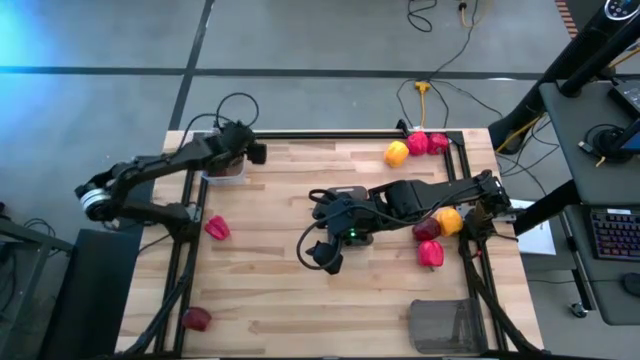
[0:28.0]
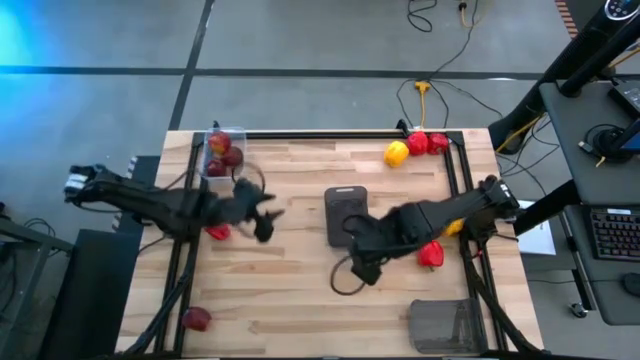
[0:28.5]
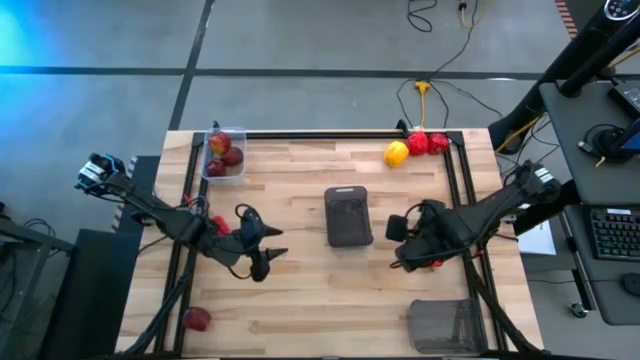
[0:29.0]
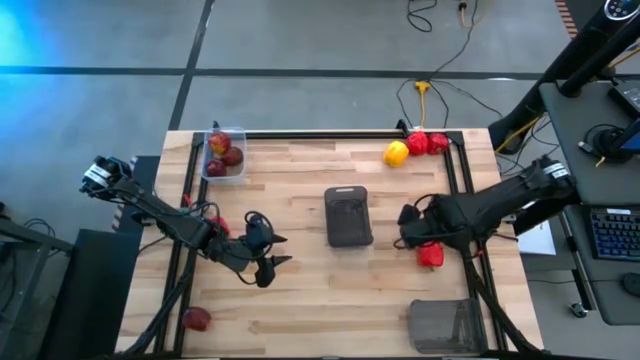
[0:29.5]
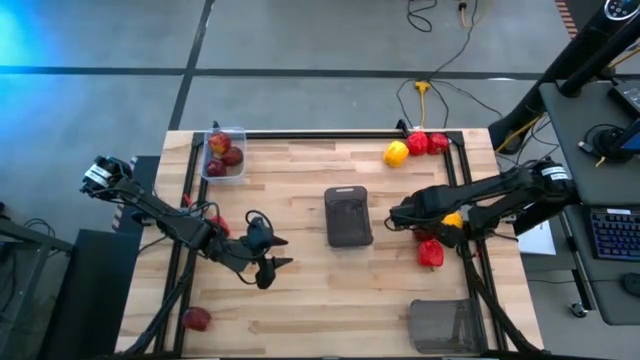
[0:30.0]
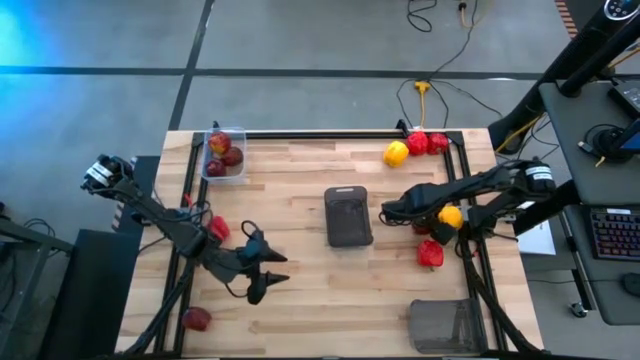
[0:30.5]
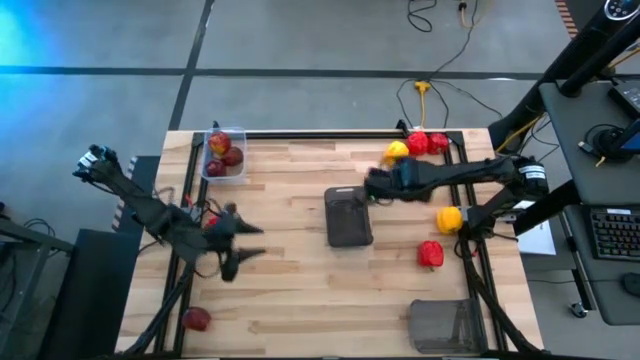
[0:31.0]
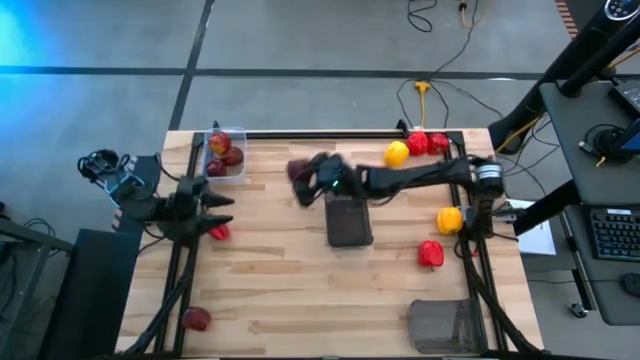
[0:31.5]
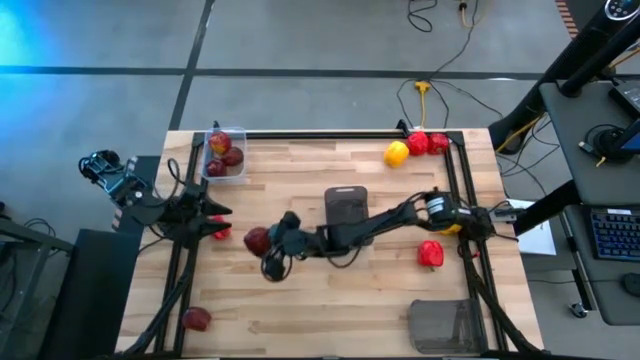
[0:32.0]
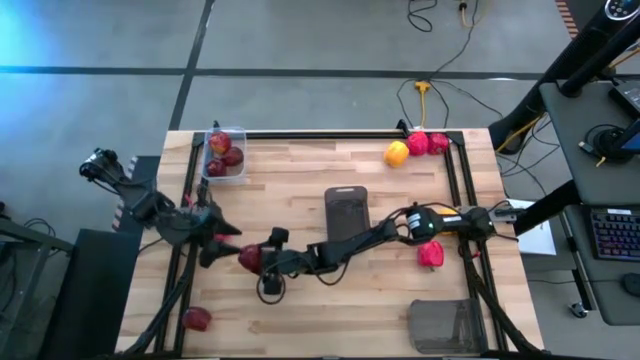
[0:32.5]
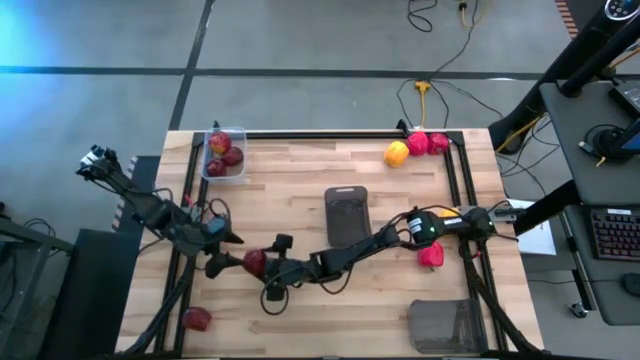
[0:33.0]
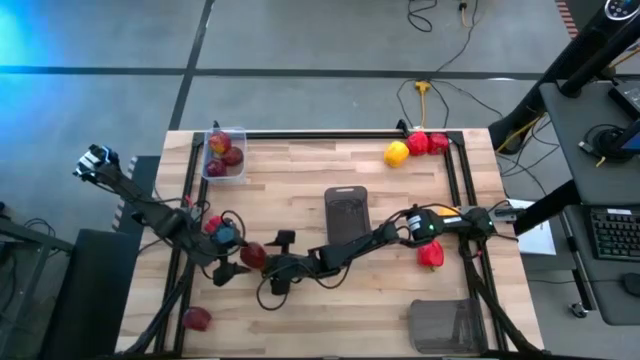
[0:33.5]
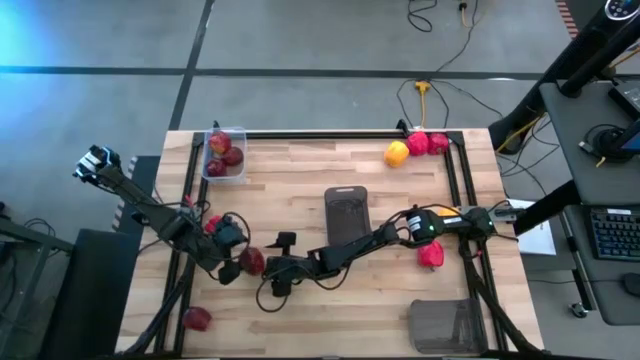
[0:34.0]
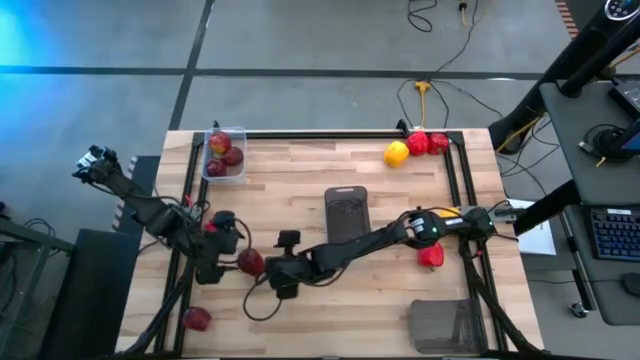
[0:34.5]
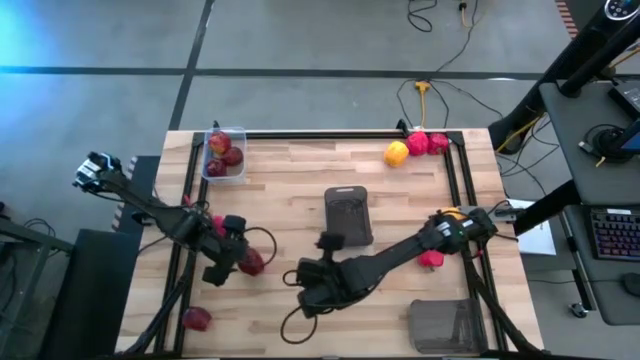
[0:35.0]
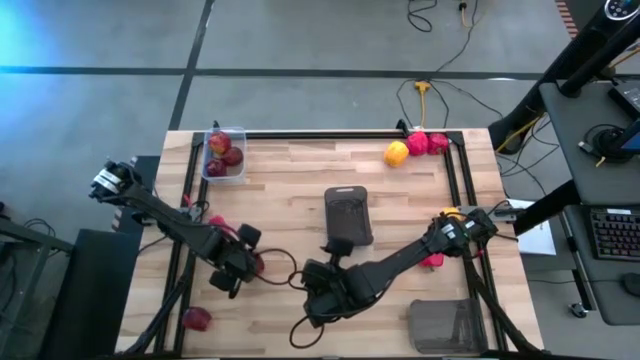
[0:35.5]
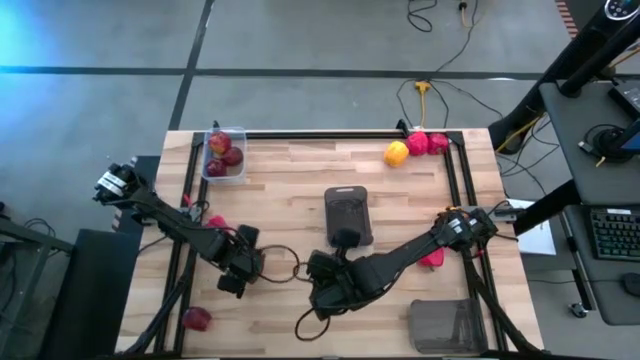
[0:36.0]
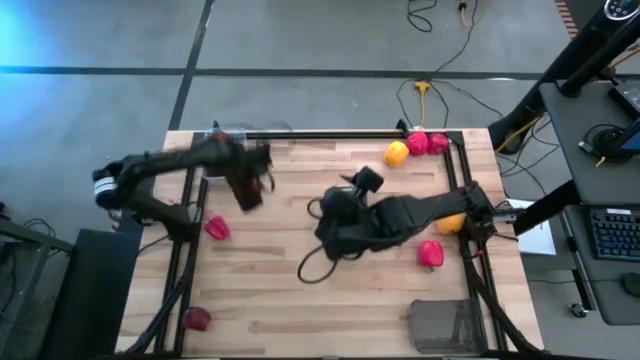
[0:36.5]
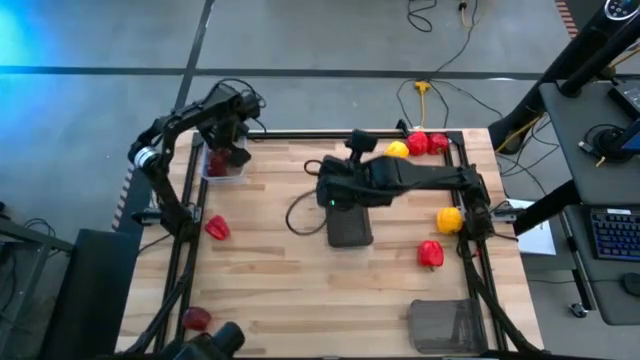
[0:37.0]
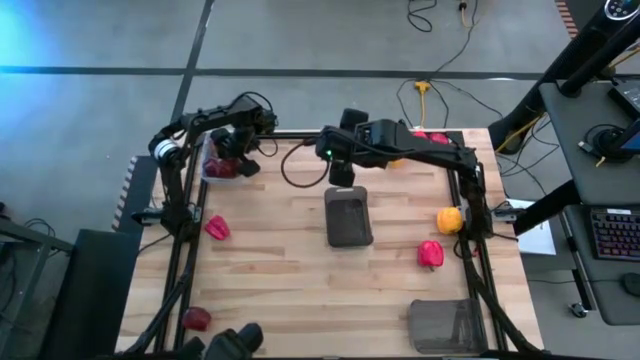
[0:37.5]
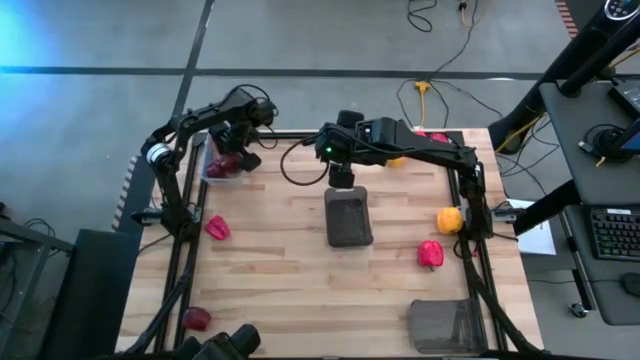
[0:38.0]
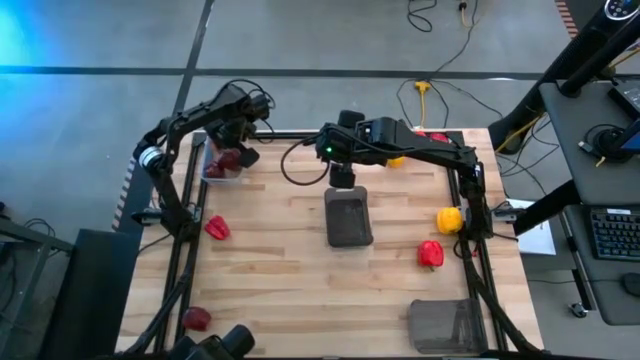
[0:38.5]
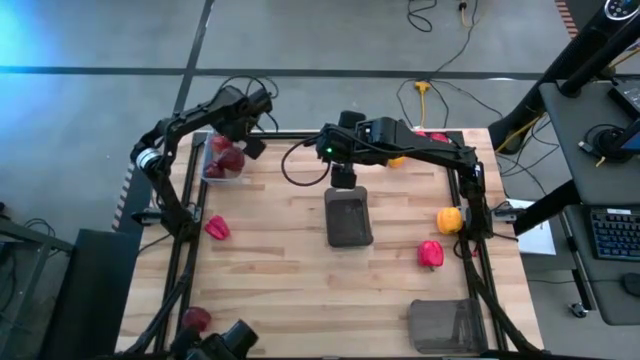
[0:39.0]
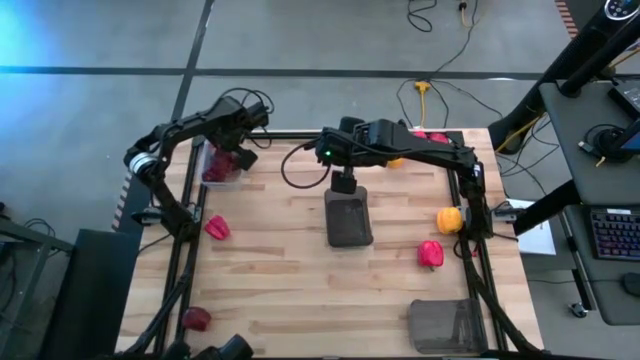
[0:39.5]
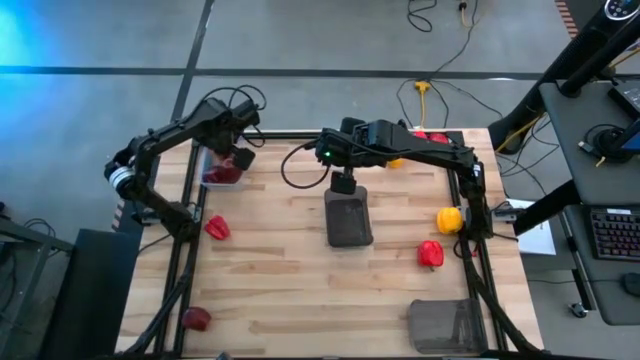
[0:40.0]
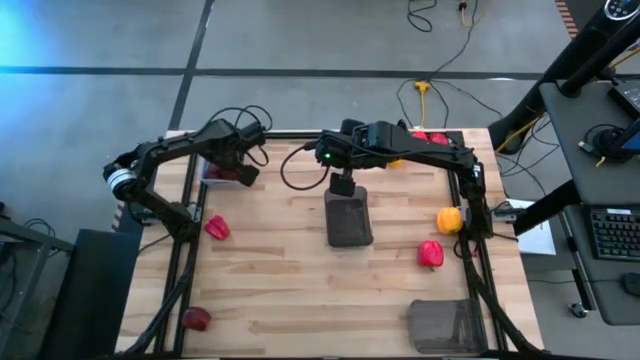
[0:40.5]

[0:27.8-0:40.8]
Task: Sort produce into baskets
Put the dark red apple into the transparent bin

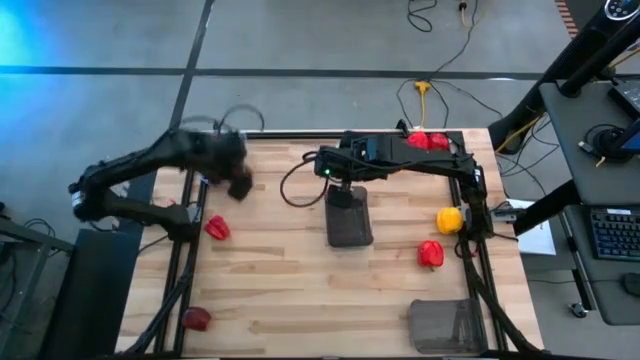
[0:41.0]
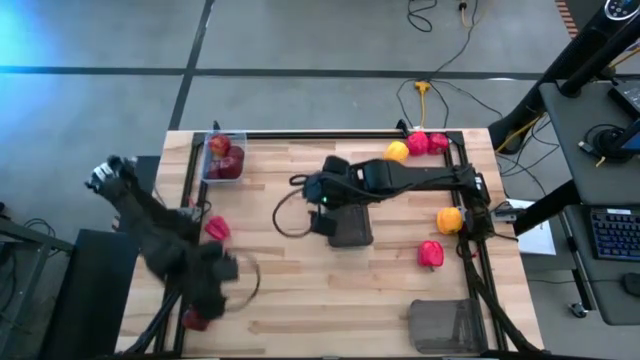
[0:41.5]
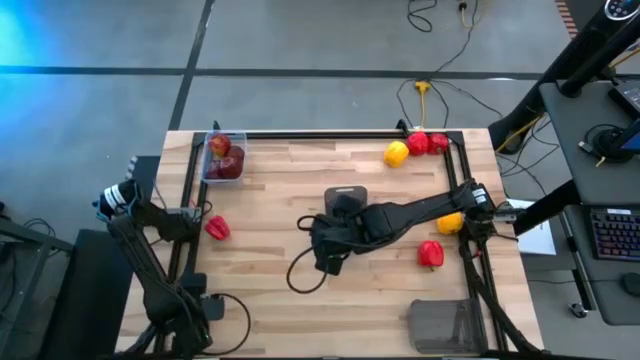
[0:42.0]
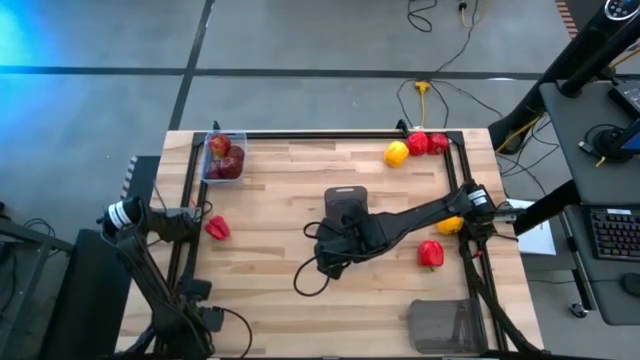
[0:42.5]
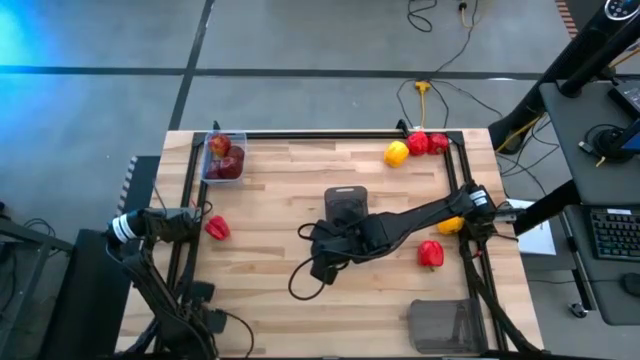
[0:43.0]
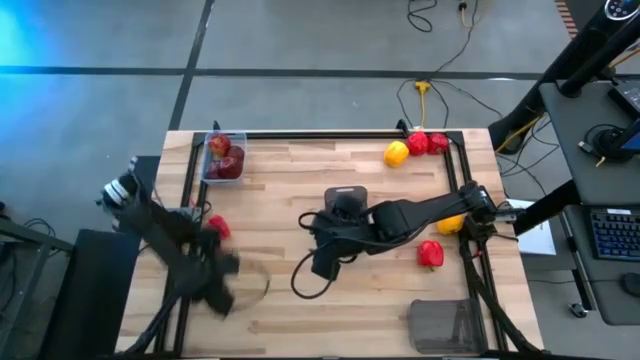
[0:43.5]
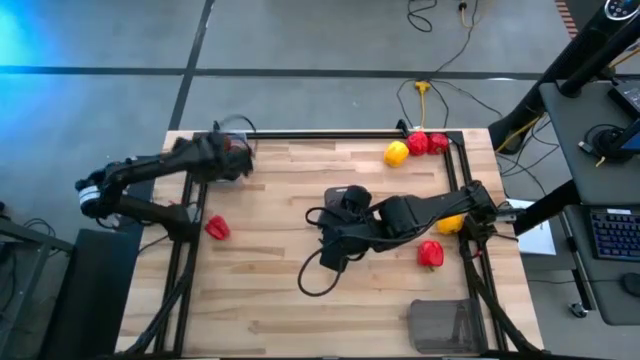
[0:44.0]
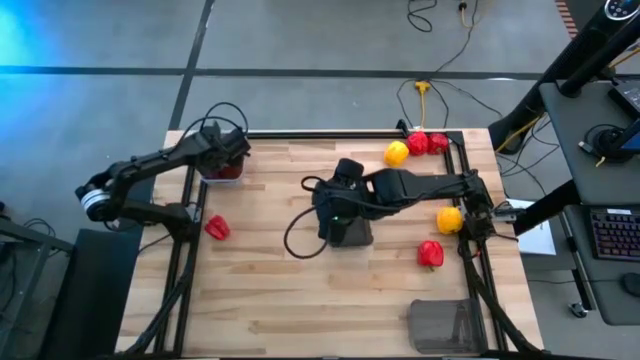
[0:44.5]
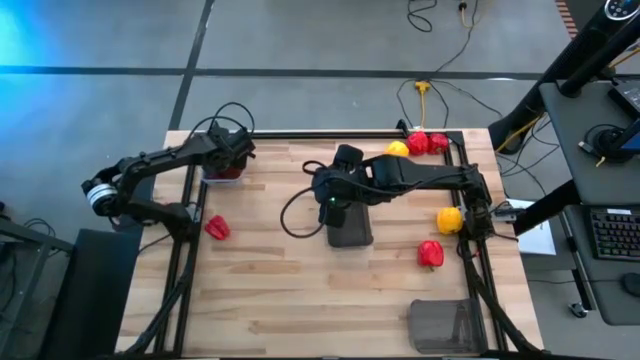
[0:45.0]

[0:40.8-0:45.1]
Put the red apple into the transparent bin

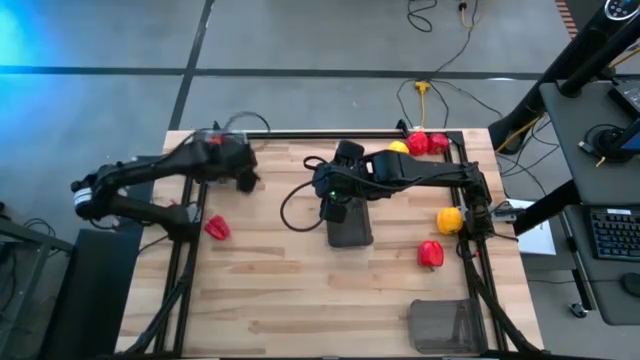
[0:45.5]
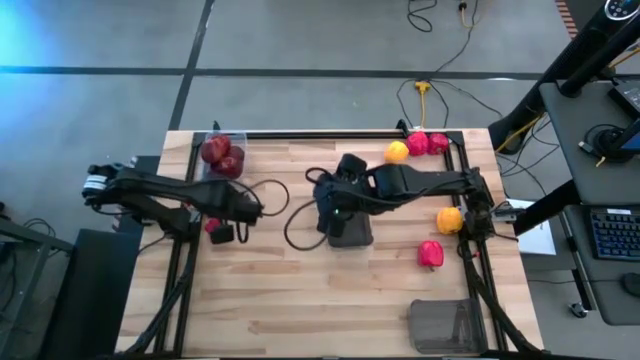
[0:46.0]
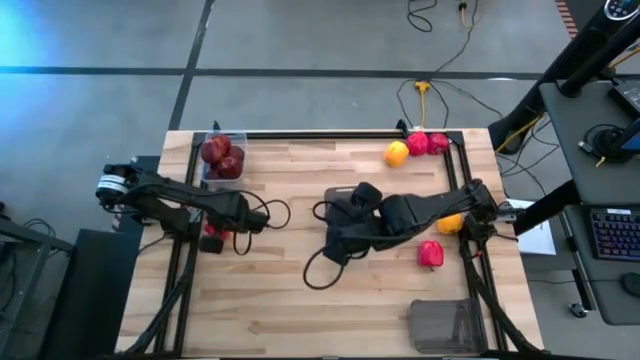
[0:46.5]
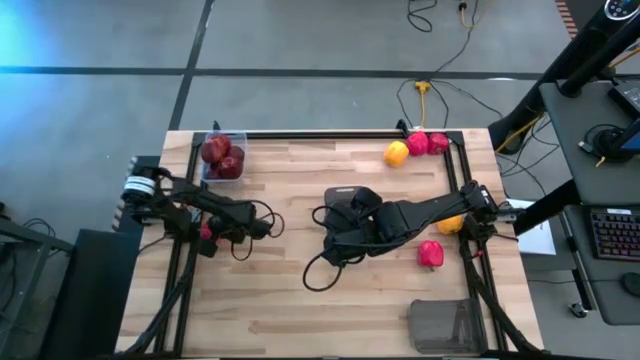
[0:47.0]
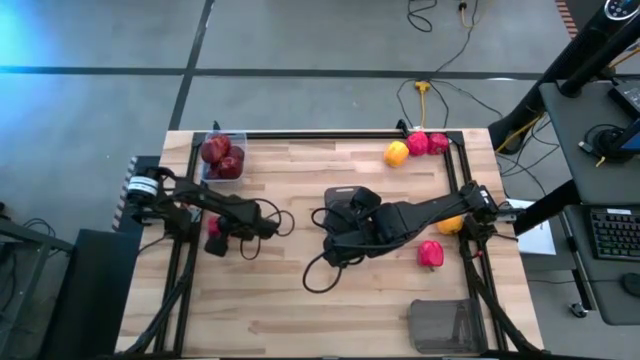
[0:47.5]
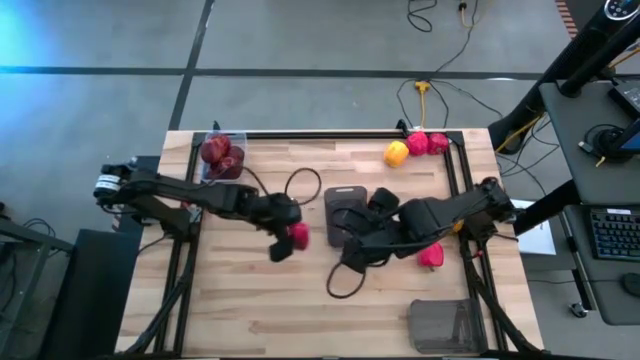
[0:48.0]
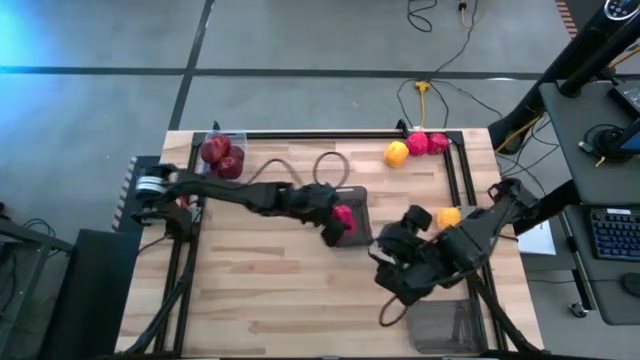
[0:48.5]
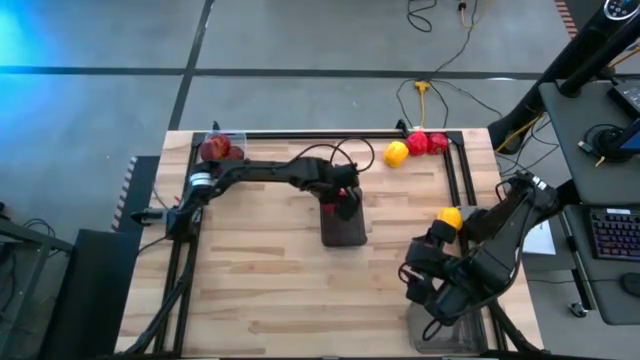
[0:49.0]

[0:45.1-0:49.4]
Put the red bell pepper into the top black transparent bin
